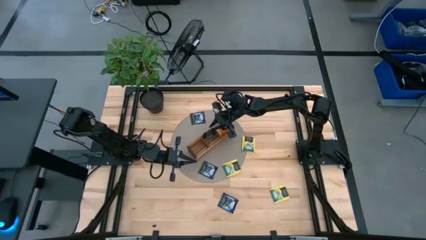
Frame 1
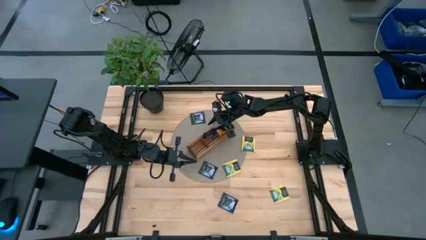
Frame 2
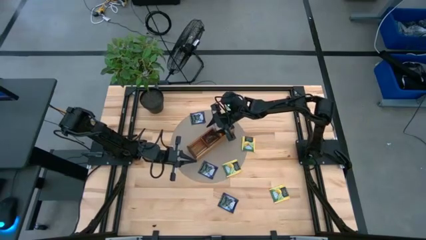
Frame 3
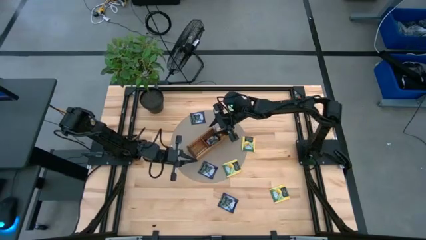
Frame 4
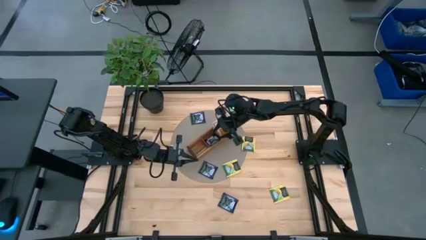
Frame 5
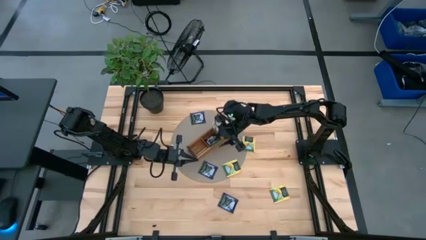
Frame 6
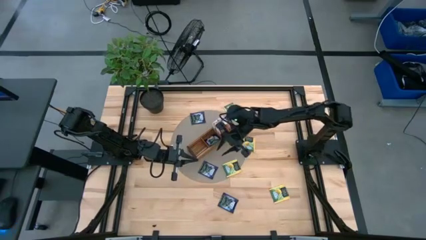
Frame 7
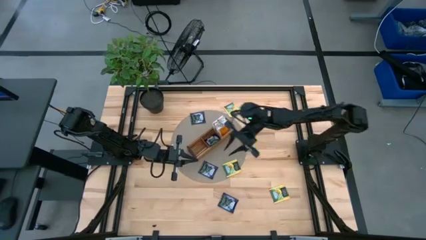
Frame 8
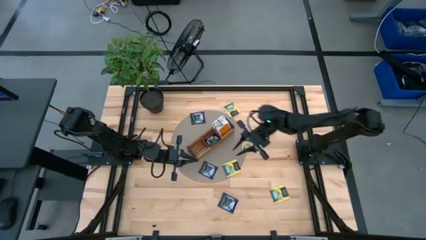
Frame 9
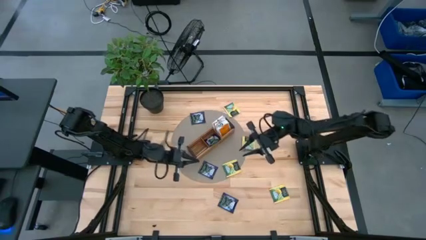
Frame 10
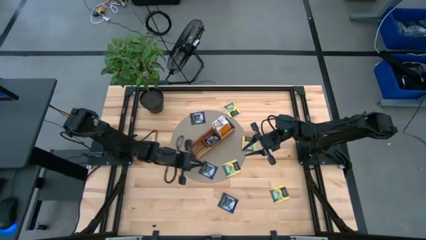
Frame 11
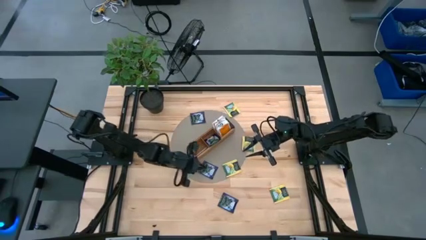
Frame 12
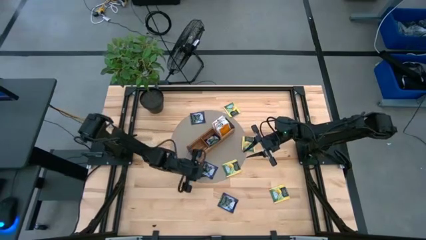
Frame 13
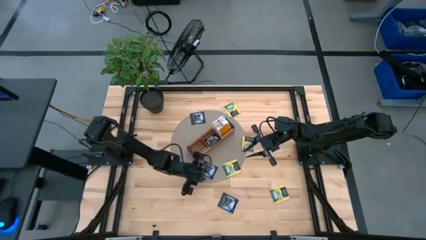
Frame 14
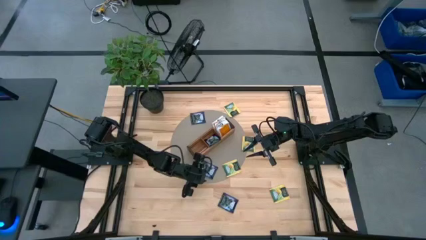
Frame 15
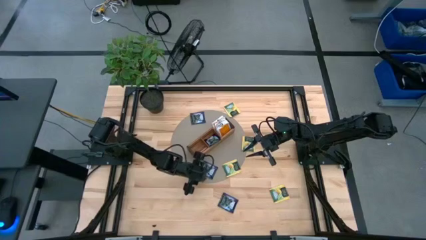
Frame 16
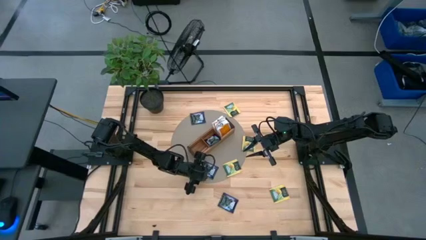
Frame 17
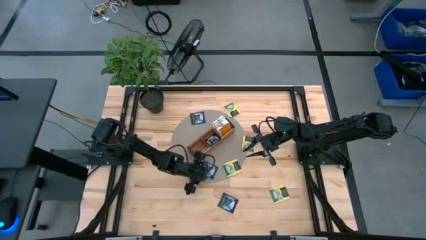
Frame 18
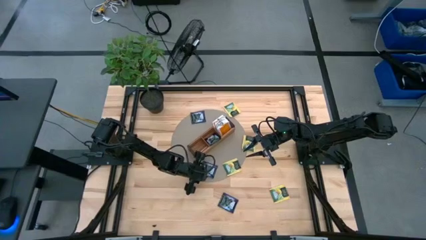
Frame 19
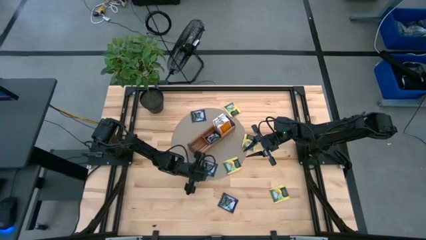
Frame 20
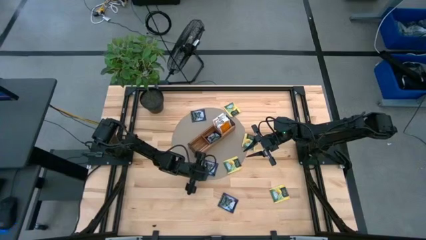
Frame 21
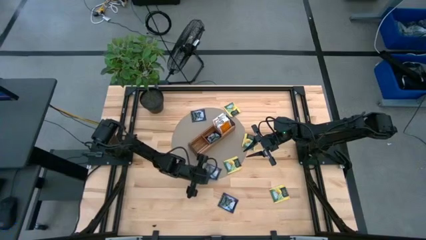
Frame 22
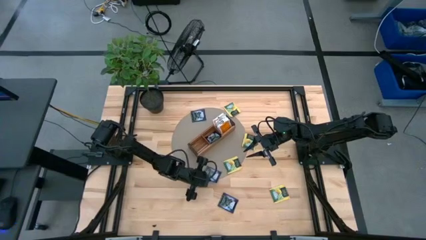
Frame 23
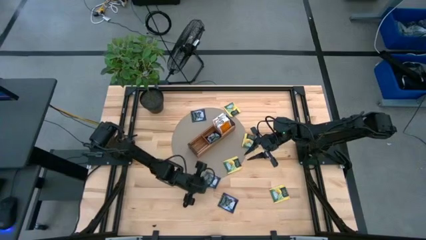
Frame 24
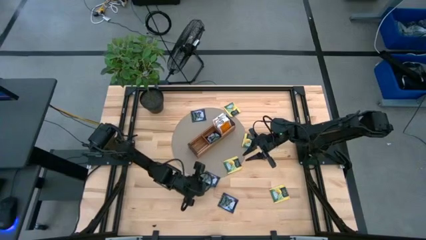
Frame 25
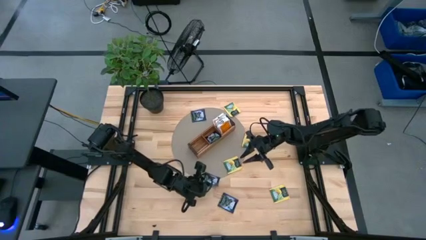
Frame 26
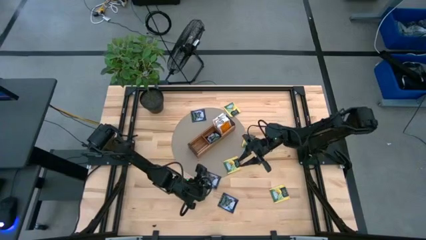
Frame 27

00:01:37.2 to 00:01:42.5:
Task: Pick & Place Tea
Put the purple tea bag into the middle section of the wooden organizer

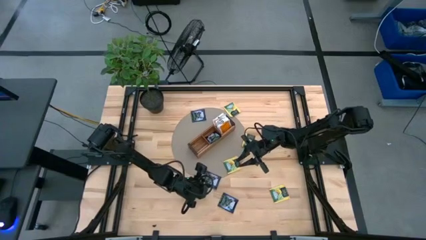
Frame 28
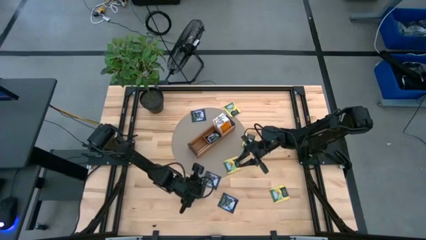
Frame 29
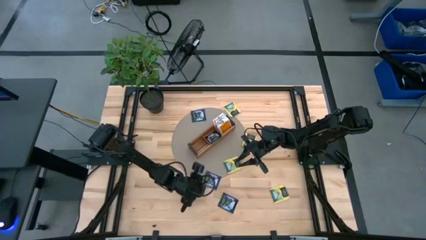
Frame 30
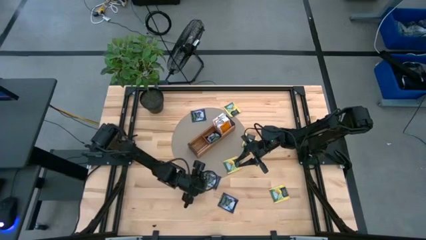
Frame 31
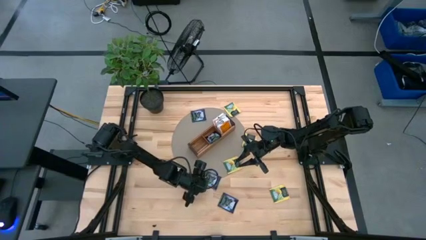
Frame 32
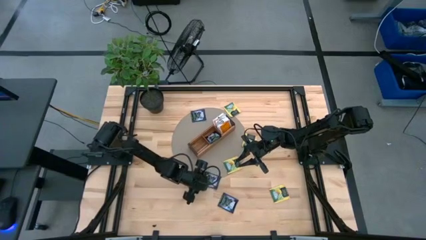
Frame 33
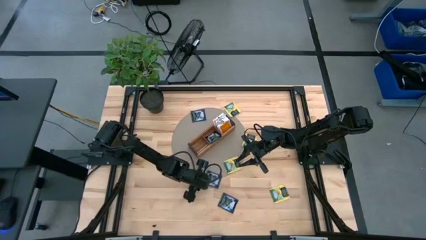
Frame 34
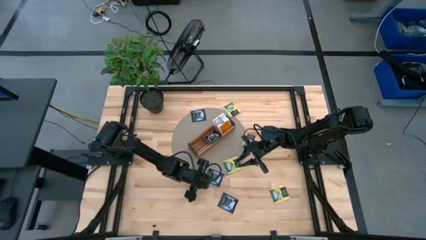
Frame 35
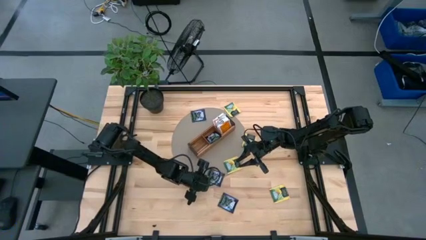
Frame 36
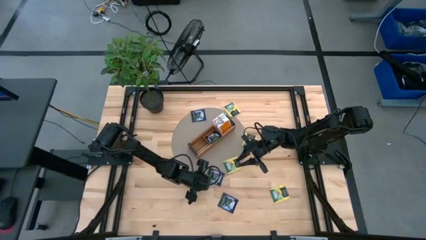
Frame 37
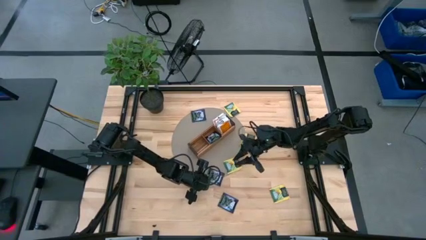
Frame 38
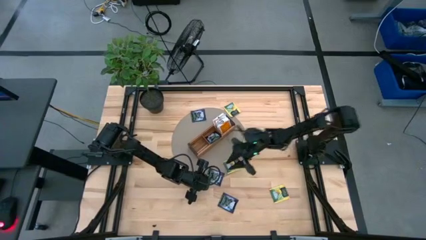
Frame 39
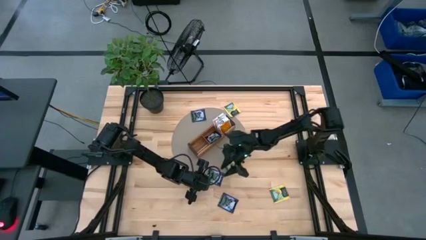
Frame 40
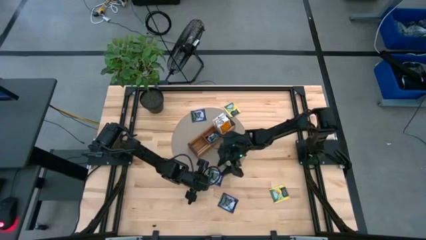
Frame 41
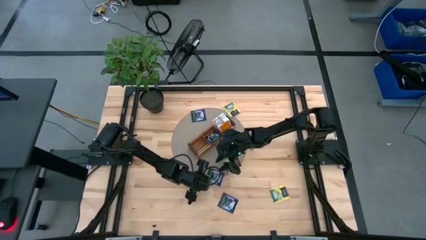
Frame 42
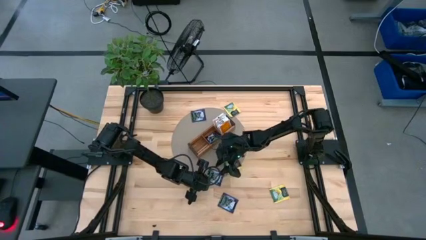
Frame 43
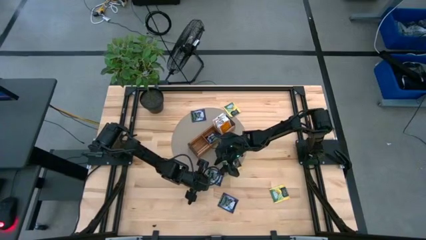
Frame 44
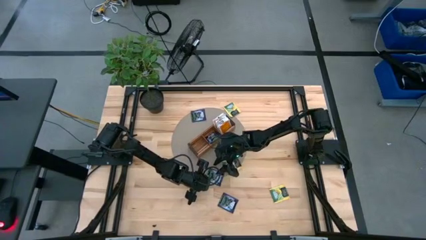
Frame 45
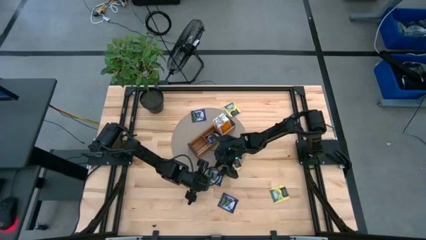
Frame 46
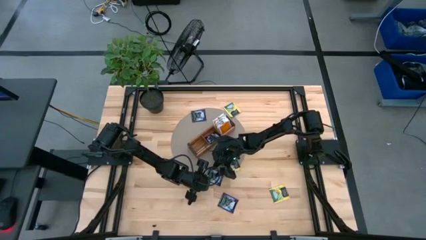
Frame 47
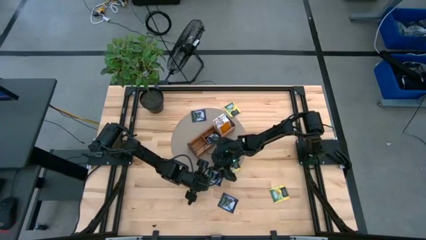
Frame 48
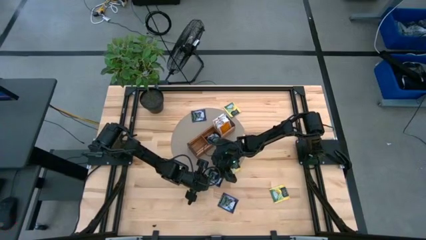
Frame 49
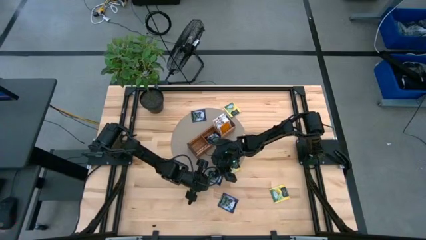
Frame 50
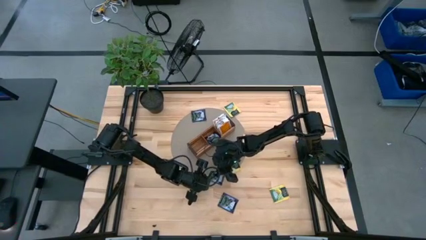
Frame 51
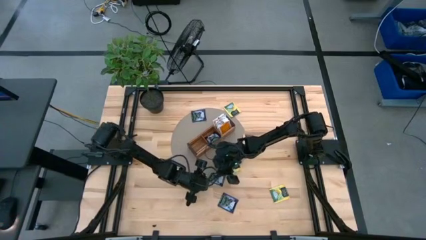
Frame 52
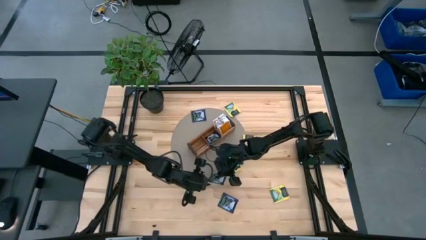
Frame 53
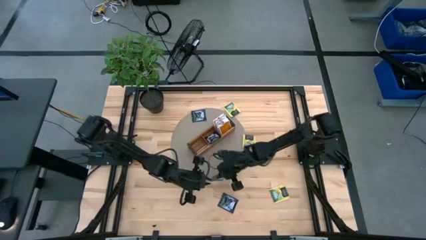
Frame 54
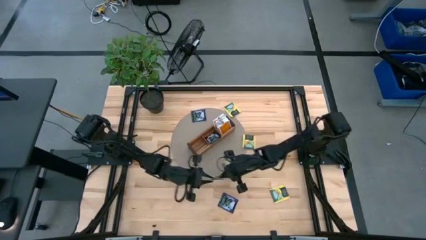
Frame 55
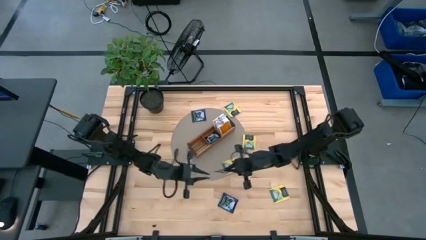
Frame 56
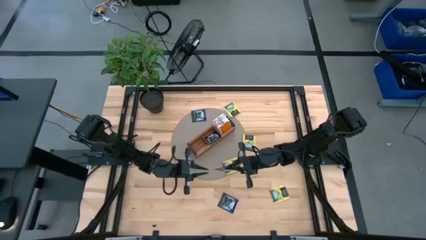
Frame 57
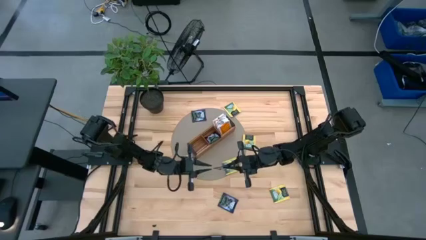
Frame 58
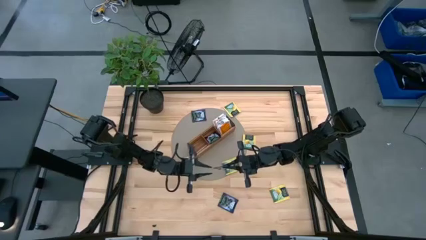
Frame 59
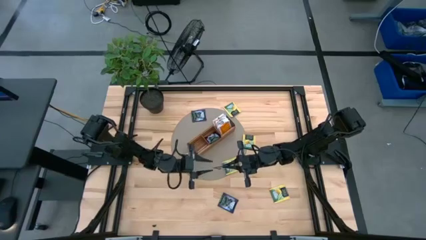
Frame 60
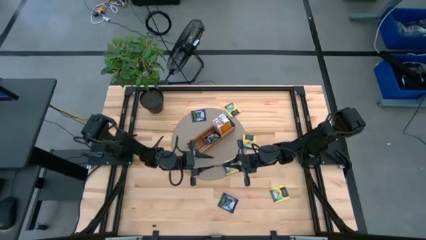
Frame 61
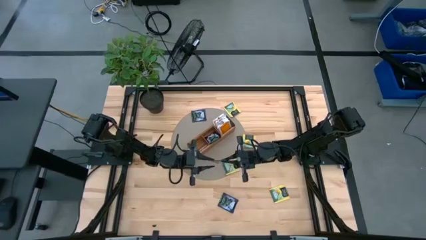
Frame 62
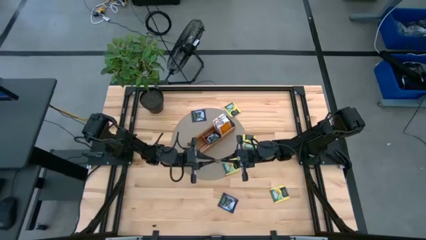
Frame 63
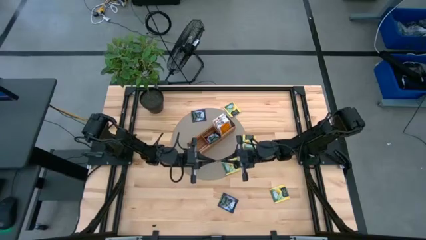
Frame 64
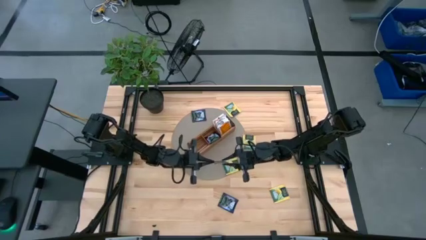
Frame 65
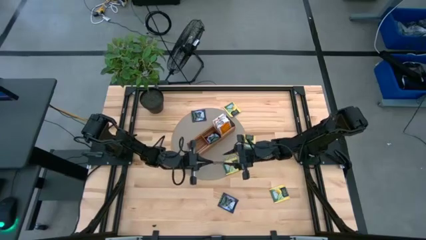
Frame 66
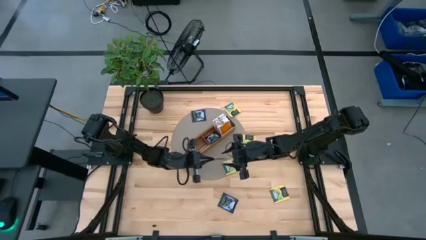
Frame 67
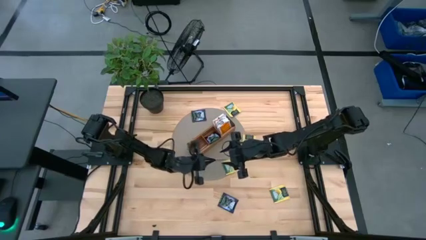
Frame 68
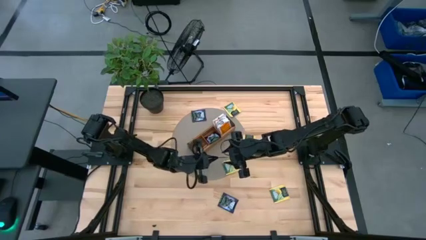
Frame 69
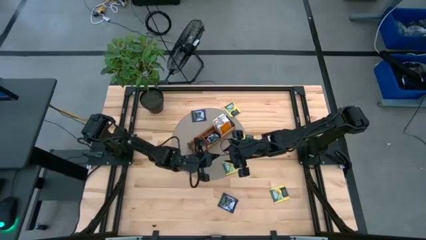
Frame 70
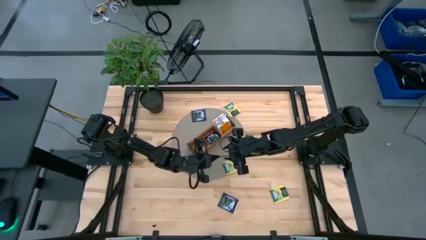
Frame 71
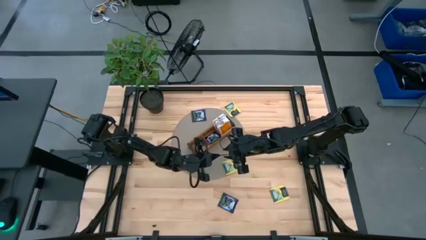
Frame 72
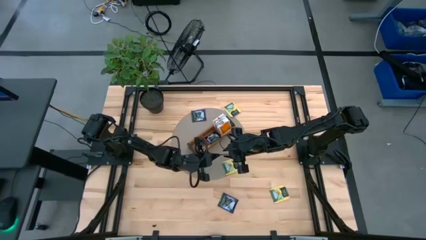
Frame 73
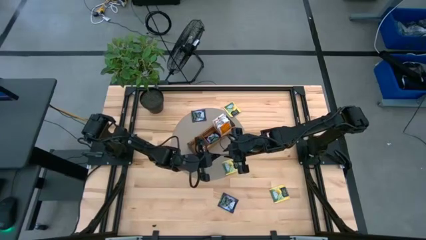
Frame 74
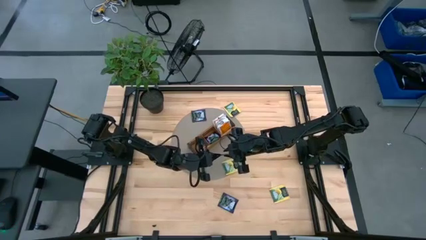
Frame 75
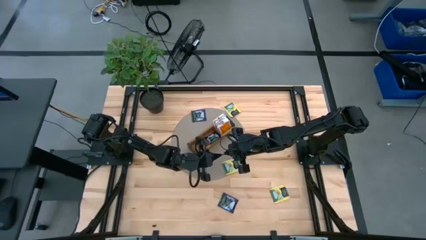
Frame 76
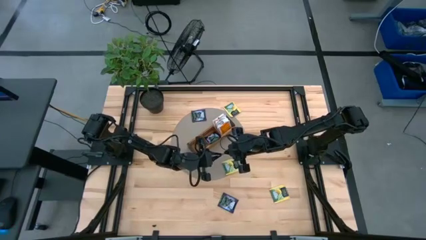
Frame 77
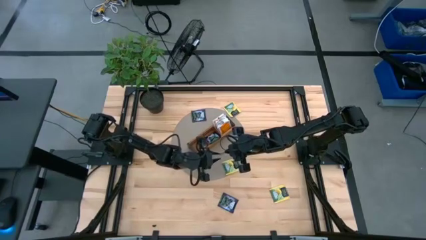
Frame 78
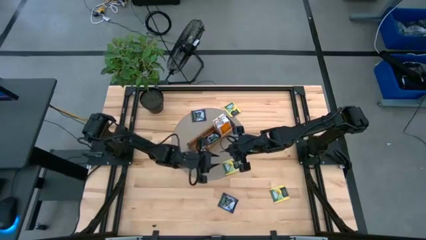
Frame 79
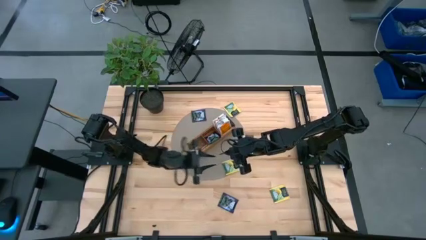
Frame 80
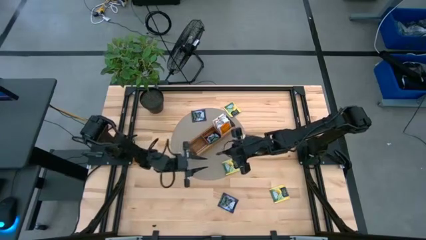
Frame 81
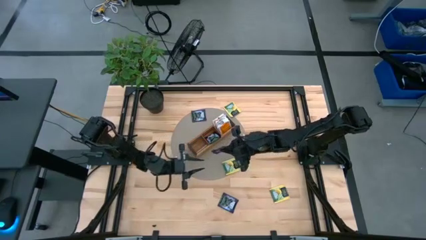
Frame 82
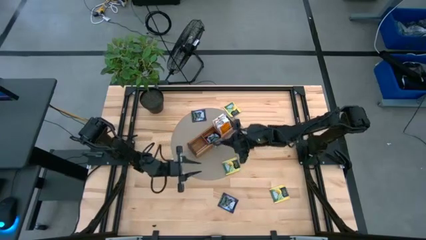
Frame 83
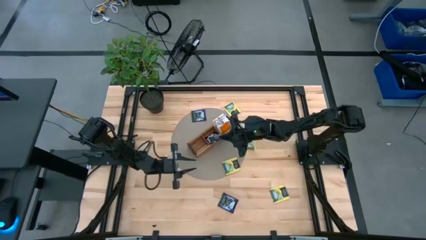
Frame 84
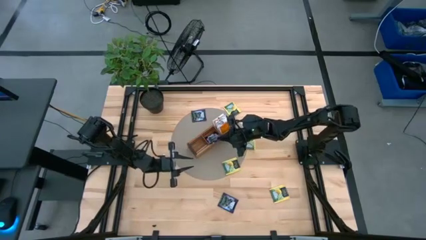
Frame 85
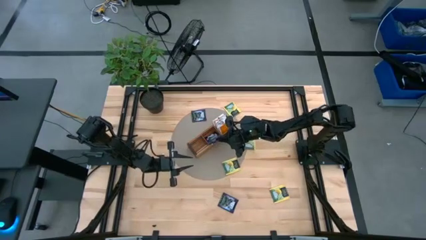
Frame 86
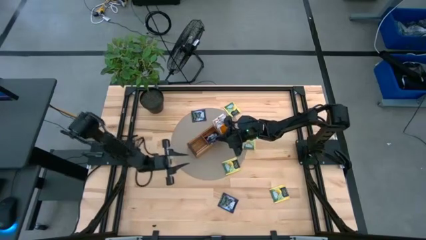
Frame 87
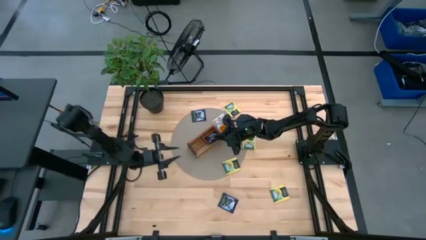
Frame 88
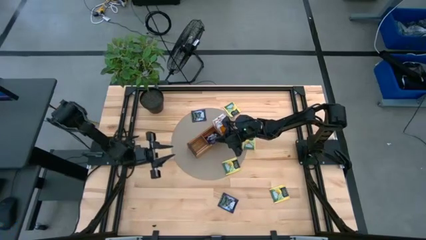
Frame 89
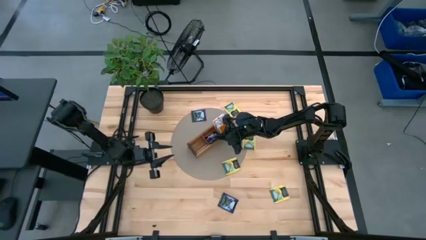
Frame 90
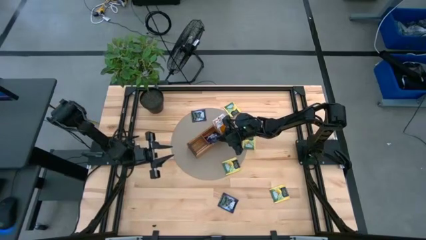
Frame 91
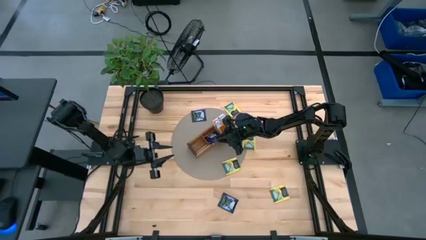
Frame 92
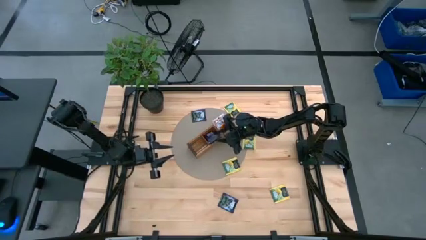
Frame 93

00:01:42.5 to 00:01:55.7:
Put the purple tea bag into the middle section of the wooden organizer
